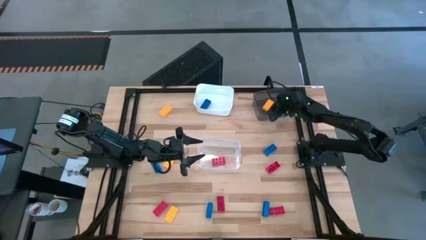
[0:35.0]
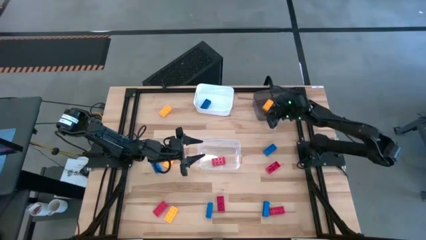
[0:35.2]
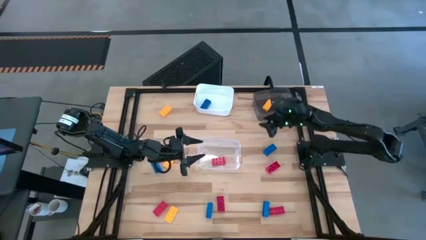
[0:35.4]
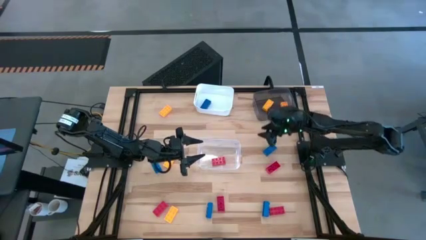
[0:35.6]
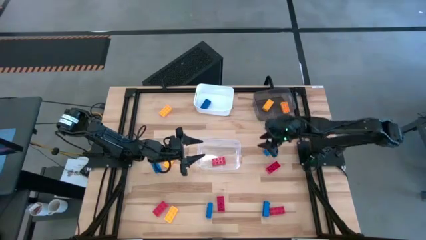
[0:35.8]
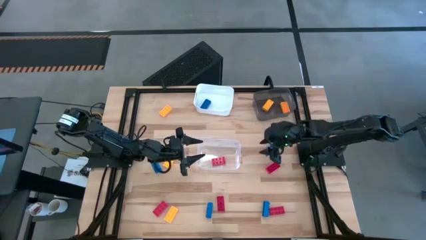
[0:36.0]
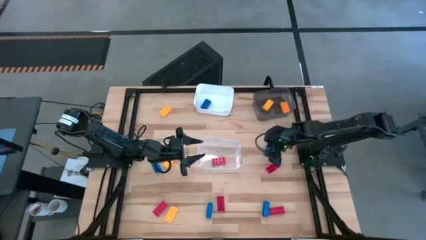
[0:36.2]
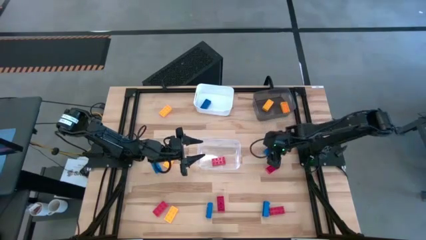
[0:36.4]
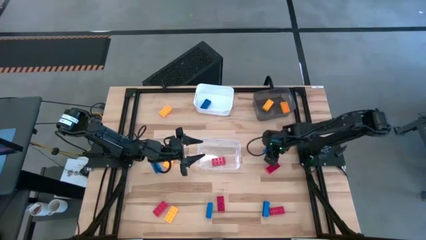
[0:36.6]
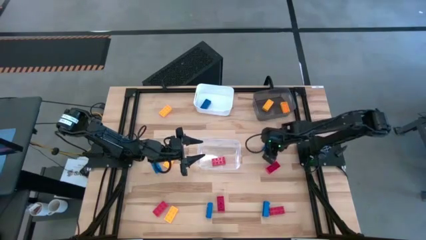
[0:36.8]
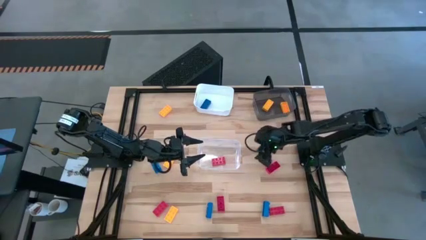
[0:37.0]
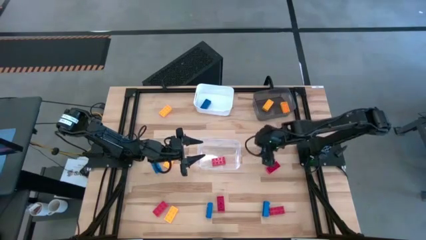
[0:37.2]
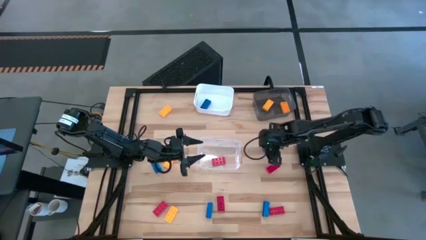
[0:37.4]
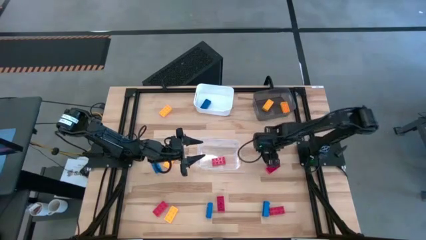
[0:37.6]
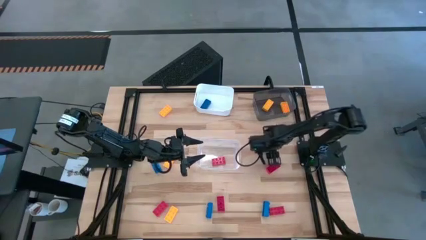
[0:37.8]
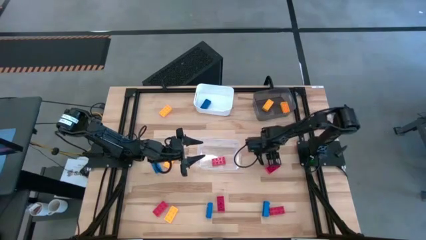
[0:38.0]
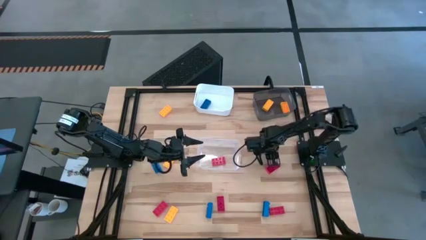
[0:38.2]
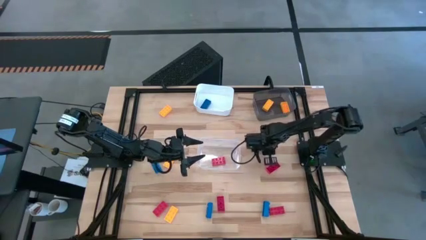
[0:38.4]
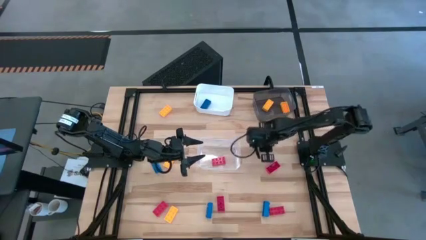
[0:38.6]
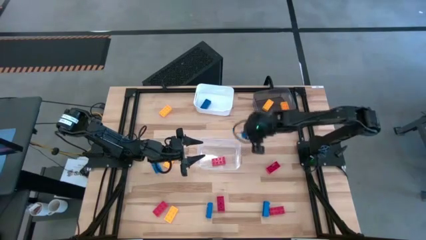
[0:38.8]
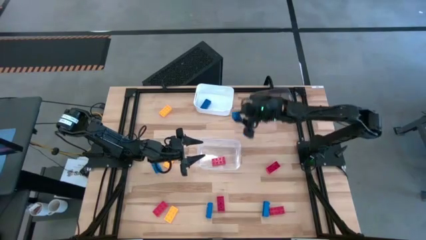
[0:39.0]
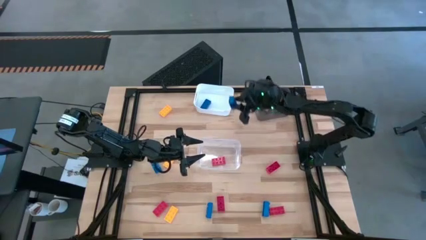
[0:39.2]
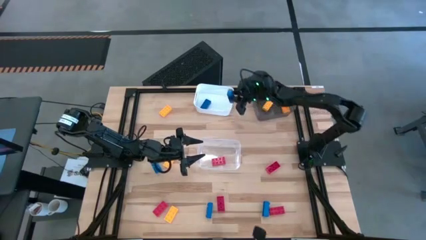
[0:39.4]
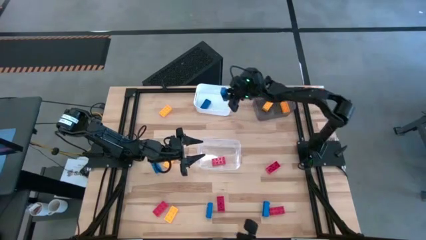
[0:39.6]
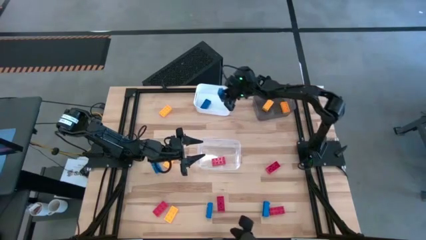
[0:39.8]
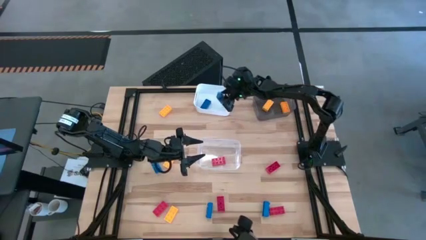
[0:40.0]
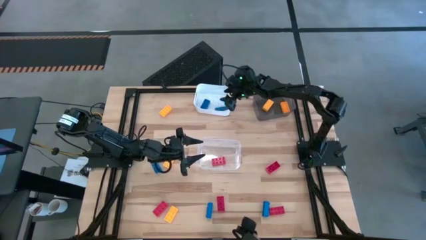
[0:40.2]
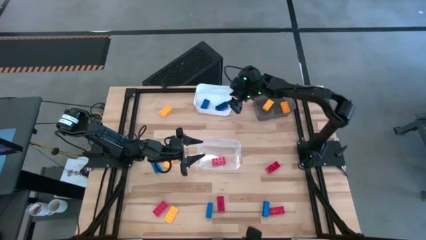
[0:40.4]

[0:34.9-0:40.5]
Task: Sort & place blocks by color
Put the top right blue block into the white bin

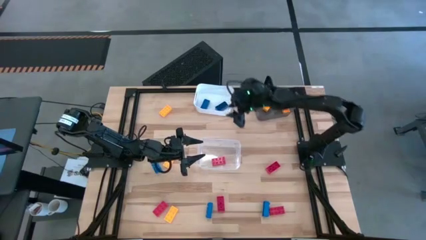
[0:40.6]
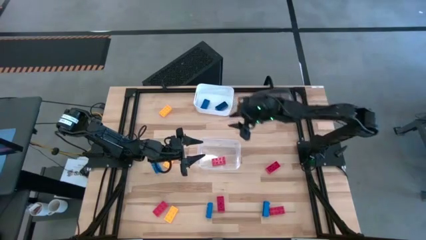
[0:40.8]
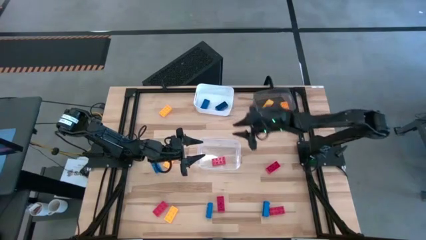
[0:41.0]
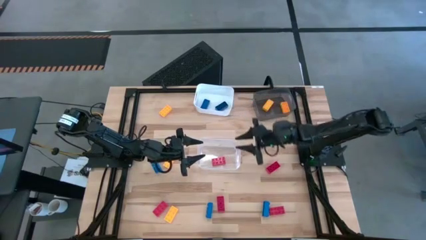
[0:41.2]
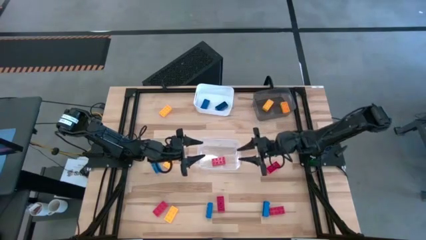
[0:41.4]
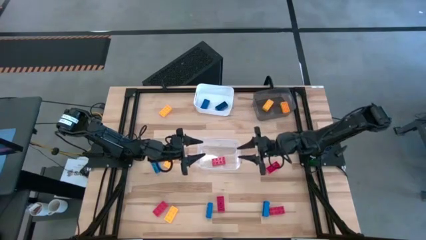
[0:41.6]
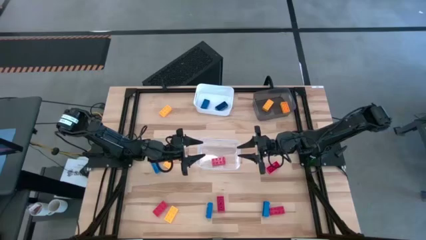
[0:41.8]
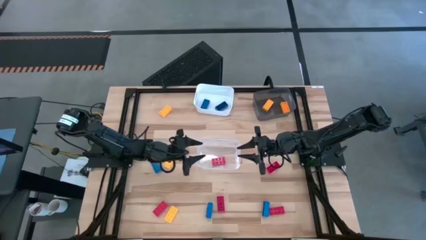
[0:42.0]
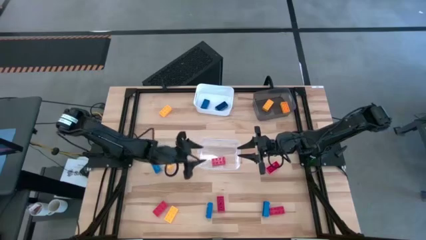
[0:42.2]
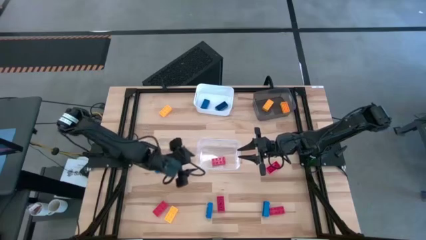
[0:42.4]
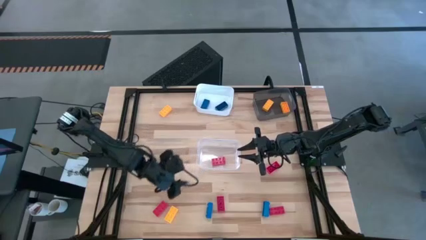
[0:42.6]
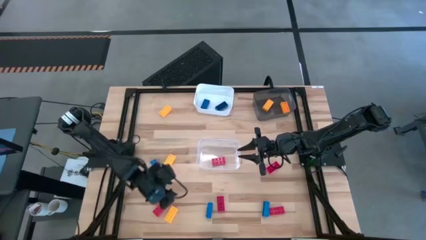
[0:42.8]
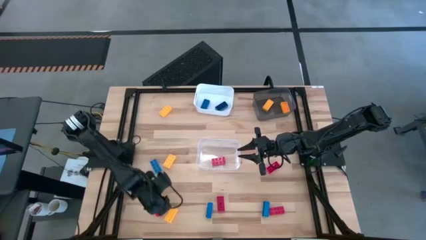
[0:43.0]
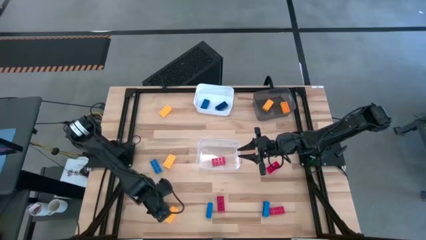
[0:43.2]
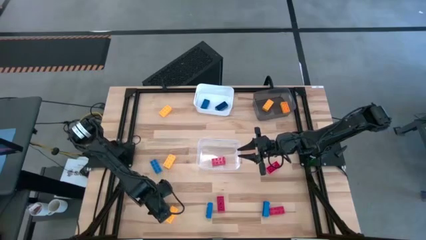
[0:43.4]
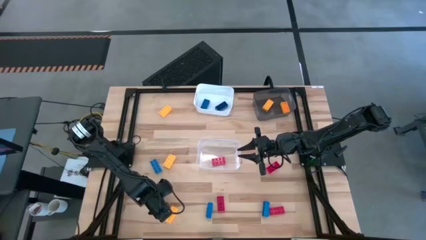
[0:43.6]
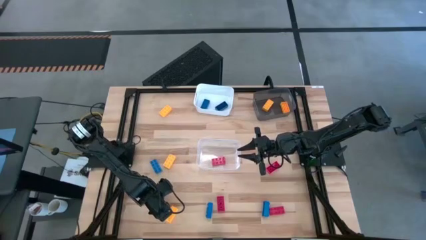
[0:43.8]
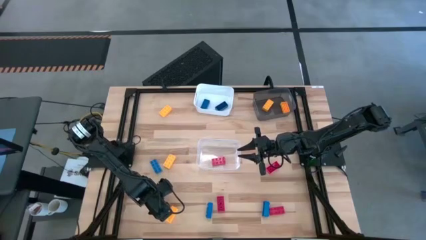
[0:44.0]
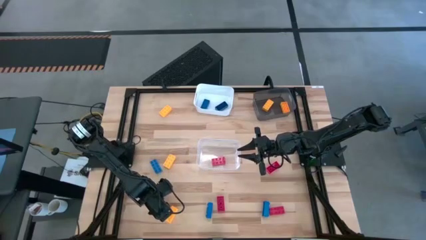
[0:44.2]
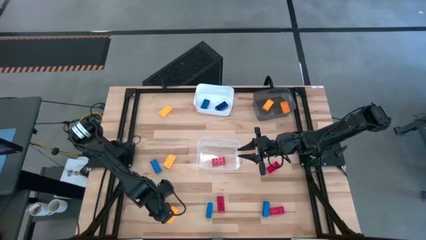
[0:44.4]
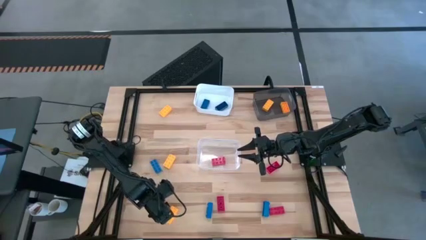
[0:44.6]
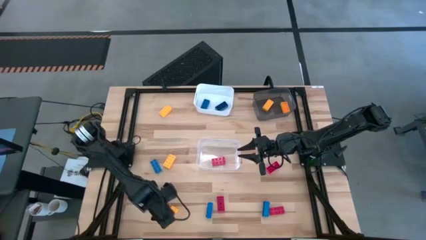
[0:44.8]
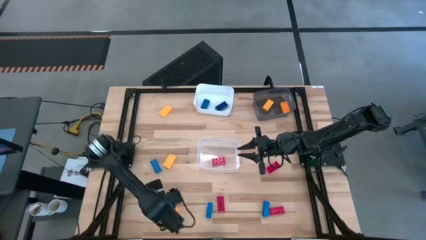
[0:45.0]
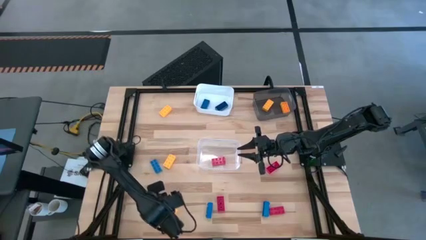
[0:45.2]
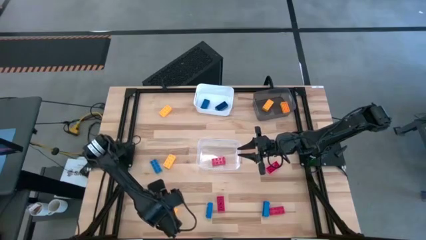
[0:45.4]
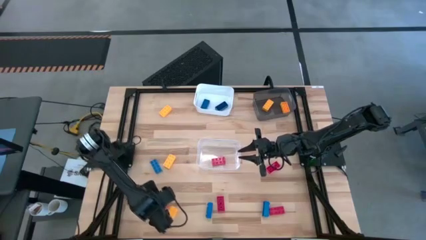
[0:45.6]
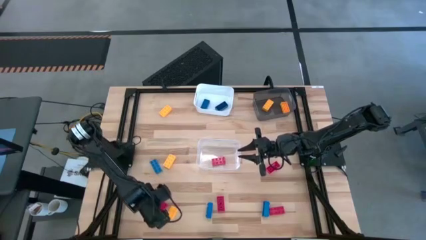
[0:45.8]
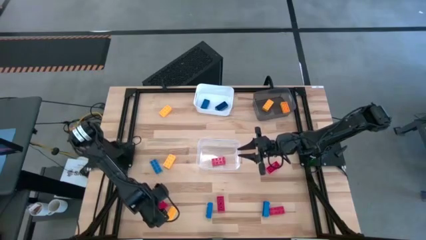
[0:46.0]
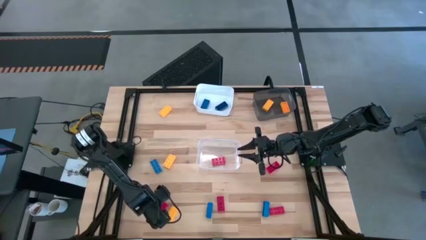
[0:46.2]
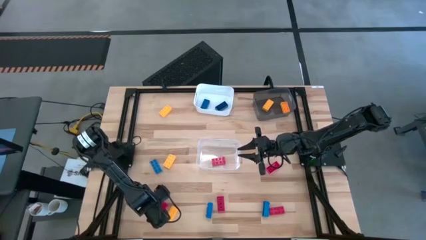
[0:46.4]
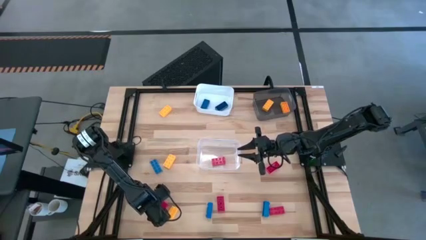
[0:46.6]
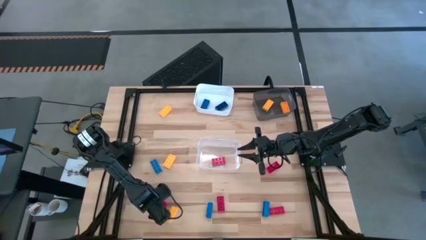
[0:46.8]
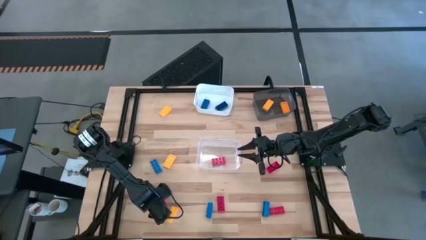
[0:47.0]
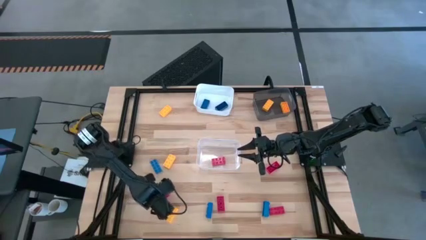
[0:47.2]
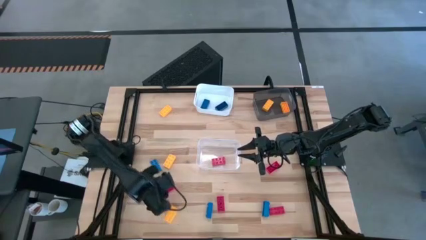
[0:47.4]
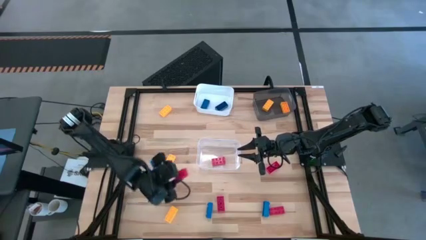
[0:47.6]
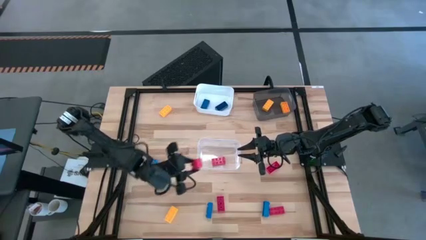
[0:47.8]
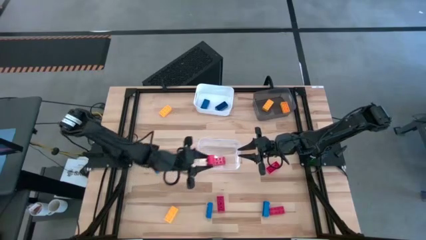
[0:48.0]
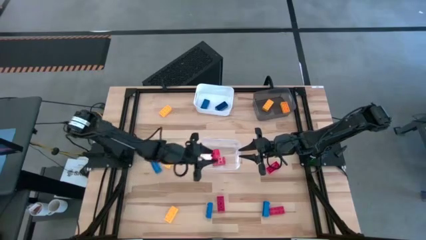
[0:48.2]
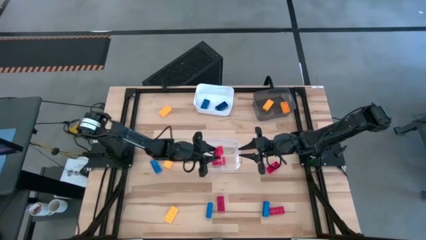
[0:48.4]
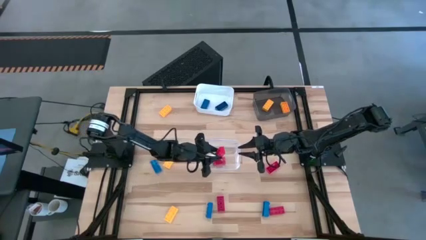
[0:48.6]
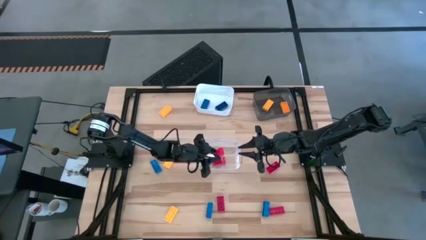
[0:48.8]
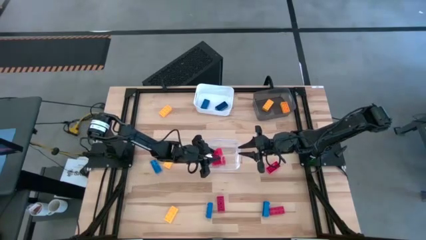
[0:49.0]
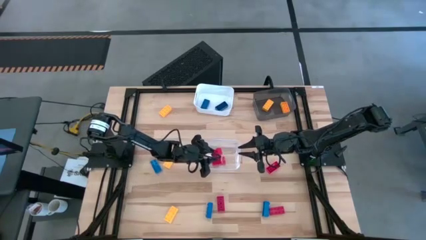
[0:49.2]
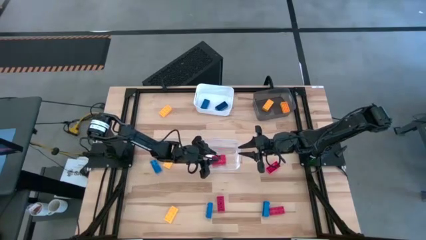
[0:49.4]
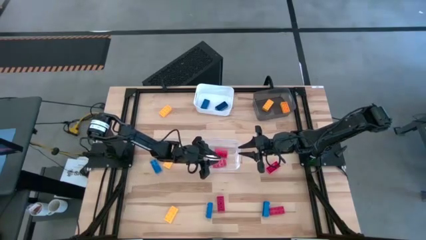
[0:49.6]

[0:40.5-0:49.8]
Put the bottom left red block into the transparent bin
